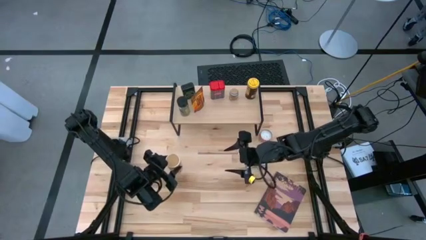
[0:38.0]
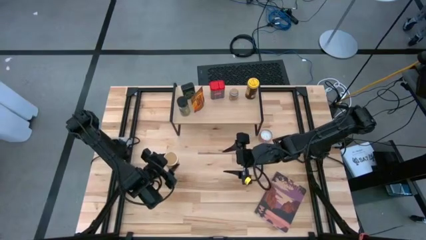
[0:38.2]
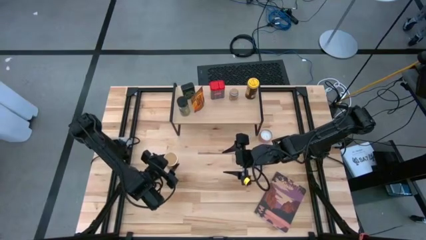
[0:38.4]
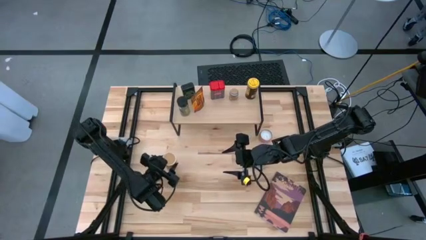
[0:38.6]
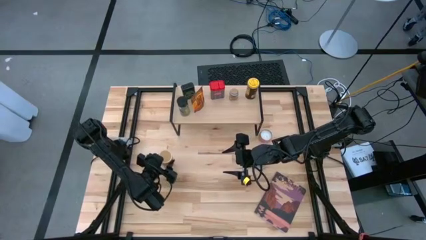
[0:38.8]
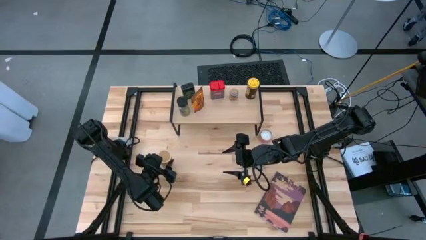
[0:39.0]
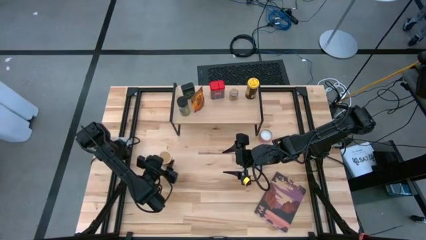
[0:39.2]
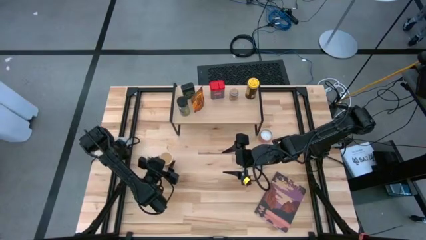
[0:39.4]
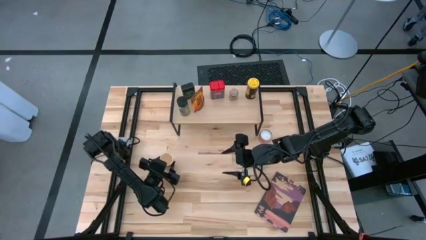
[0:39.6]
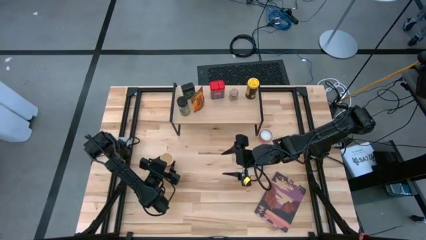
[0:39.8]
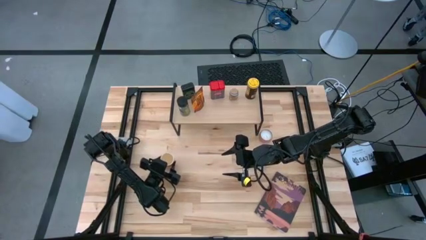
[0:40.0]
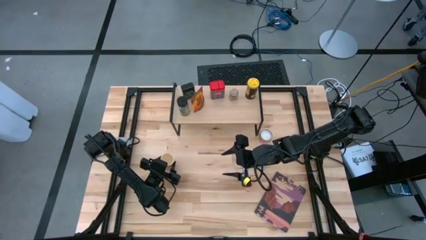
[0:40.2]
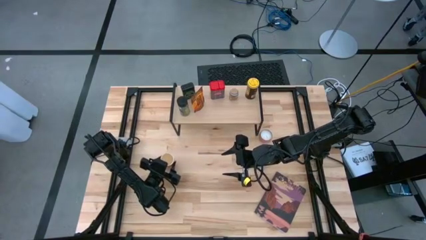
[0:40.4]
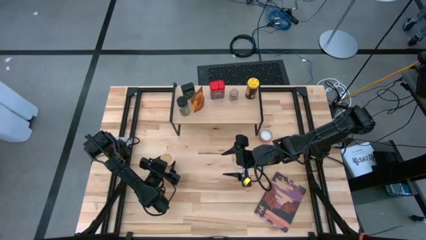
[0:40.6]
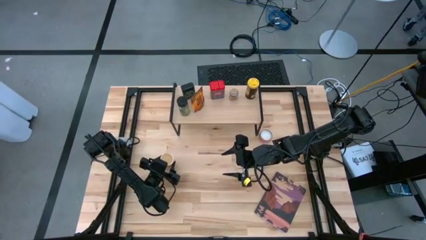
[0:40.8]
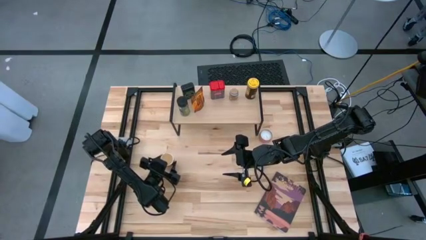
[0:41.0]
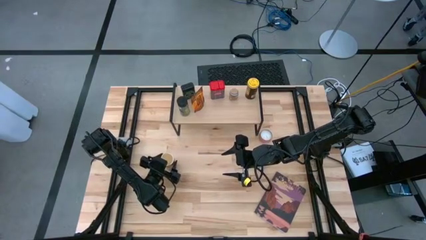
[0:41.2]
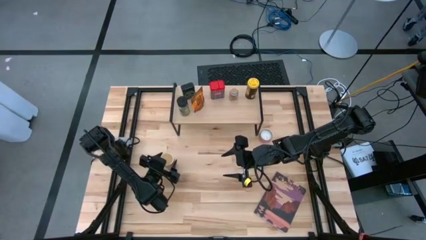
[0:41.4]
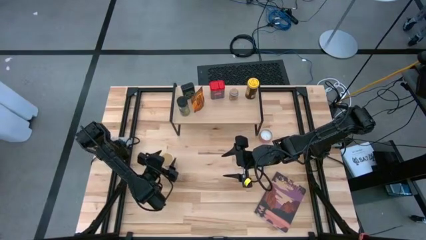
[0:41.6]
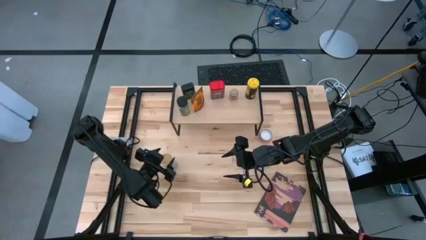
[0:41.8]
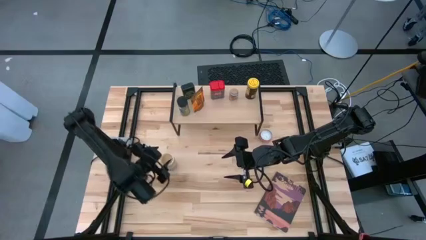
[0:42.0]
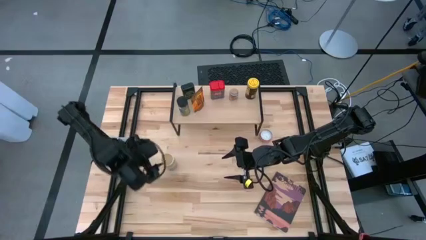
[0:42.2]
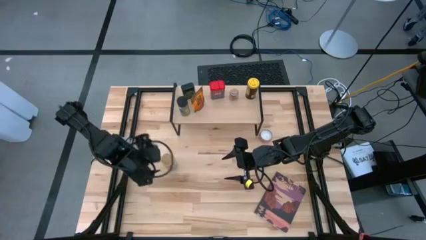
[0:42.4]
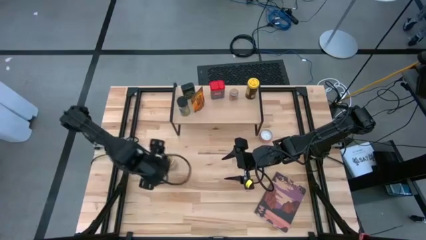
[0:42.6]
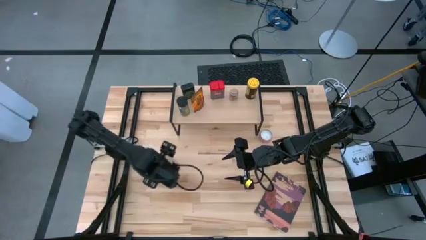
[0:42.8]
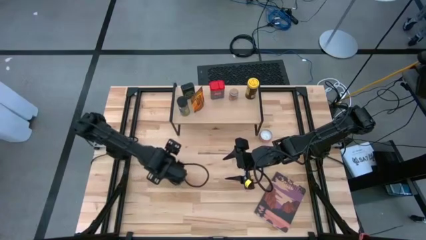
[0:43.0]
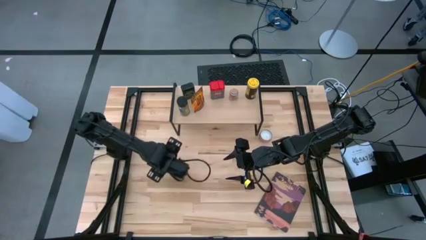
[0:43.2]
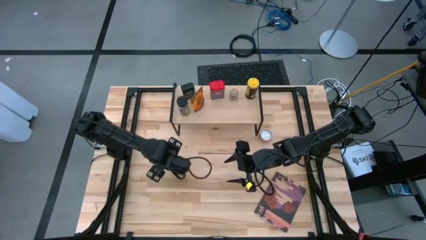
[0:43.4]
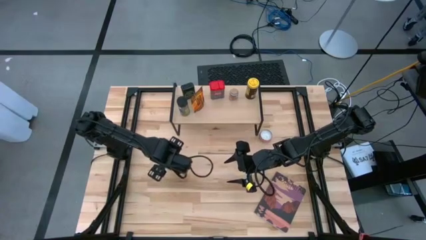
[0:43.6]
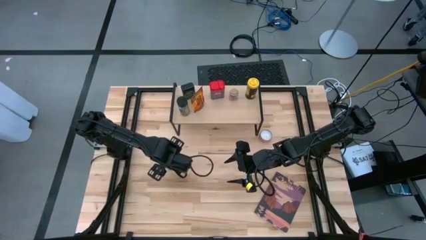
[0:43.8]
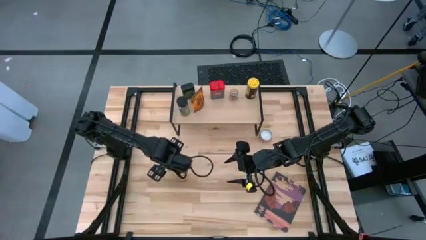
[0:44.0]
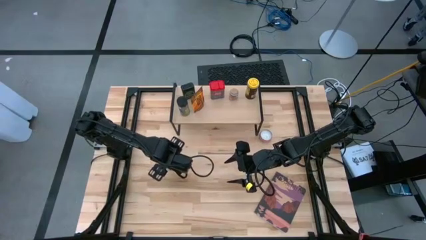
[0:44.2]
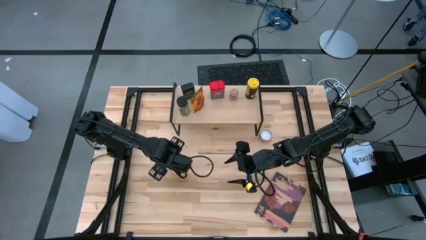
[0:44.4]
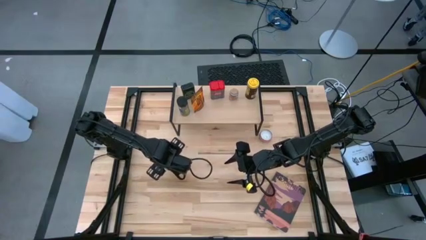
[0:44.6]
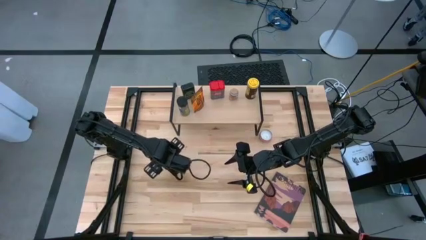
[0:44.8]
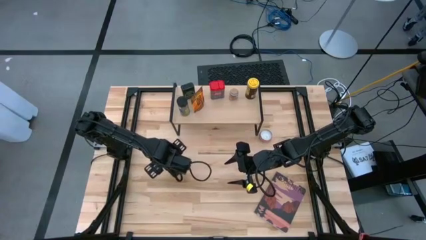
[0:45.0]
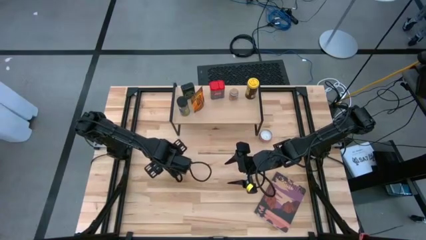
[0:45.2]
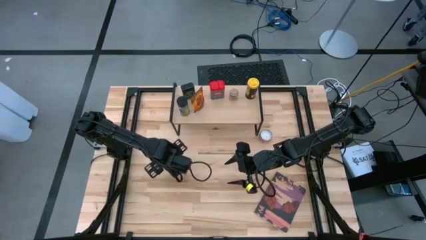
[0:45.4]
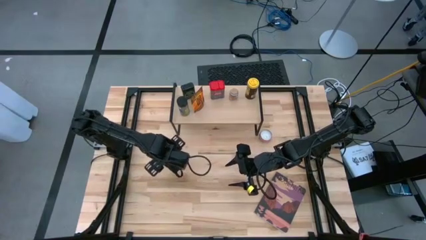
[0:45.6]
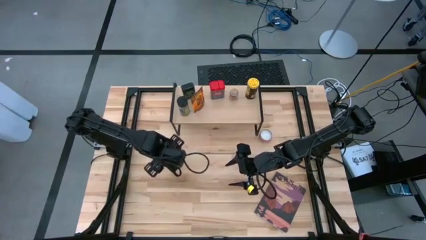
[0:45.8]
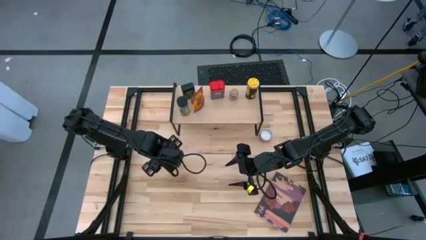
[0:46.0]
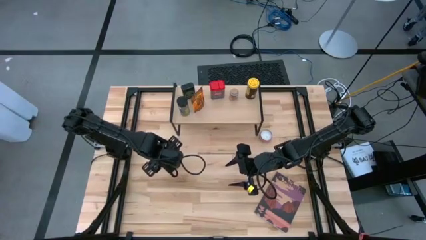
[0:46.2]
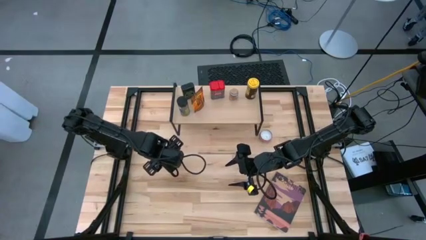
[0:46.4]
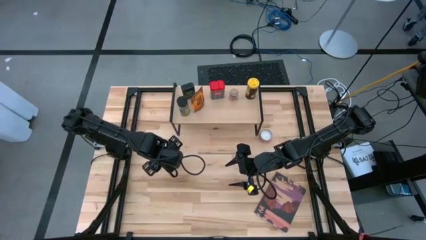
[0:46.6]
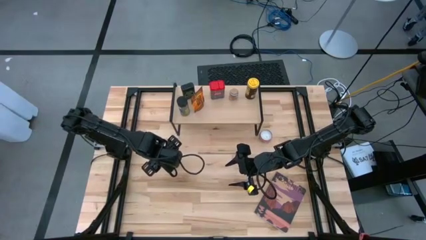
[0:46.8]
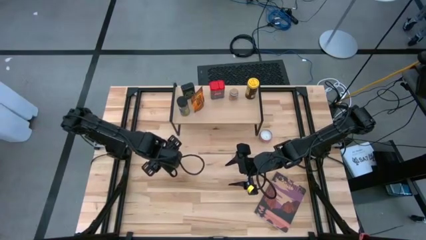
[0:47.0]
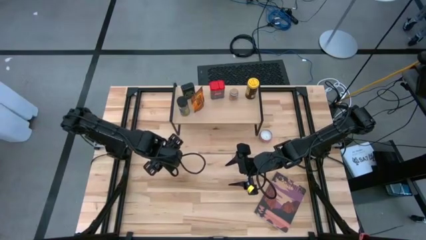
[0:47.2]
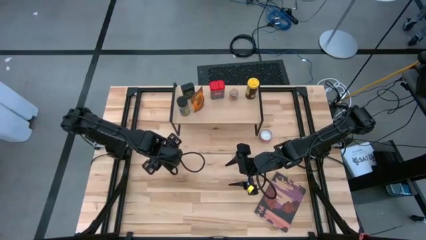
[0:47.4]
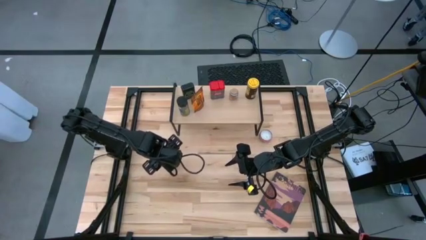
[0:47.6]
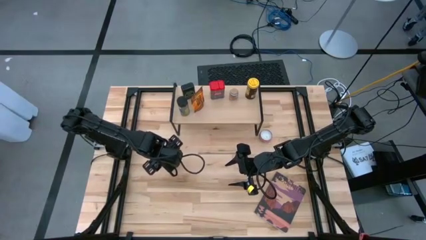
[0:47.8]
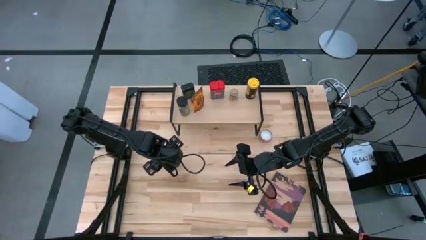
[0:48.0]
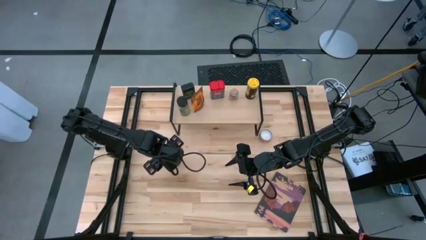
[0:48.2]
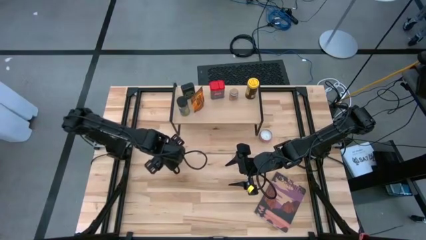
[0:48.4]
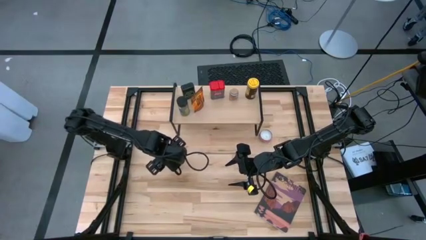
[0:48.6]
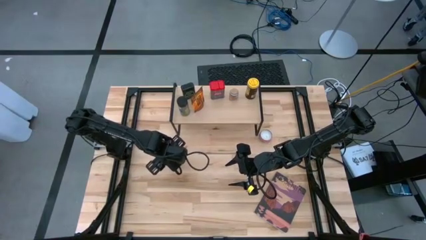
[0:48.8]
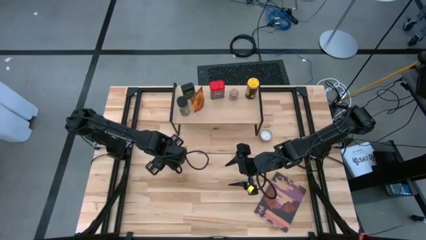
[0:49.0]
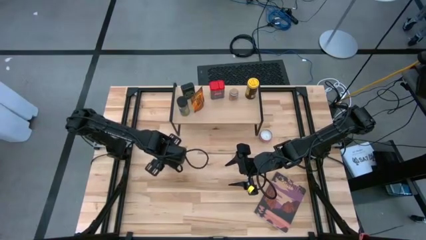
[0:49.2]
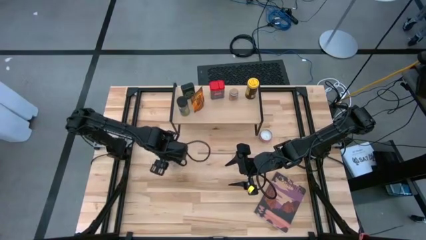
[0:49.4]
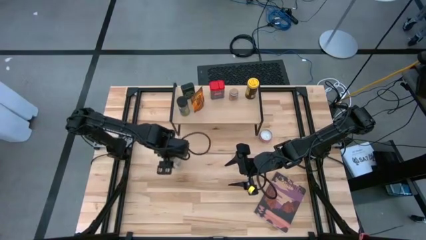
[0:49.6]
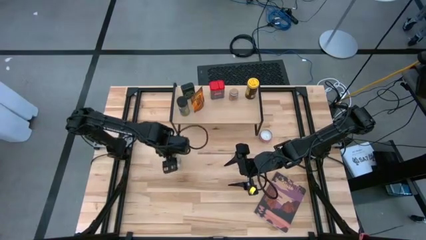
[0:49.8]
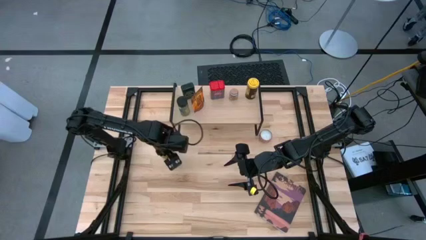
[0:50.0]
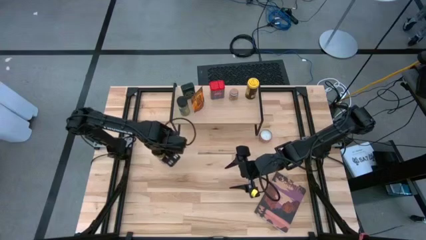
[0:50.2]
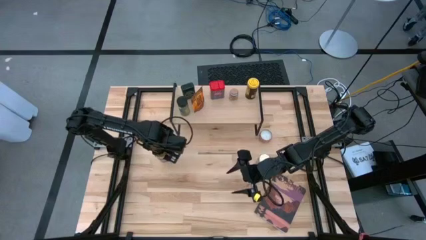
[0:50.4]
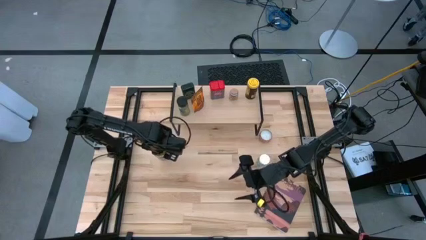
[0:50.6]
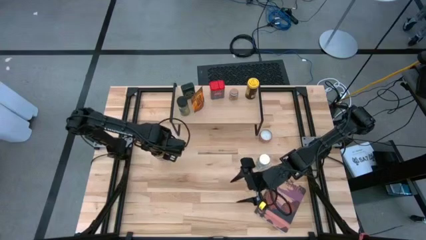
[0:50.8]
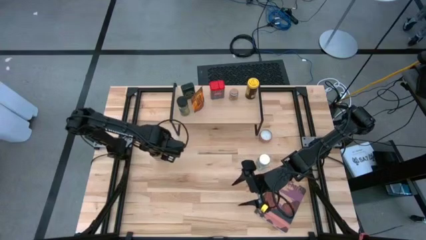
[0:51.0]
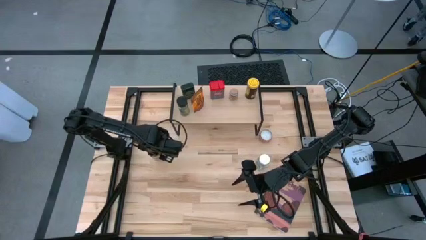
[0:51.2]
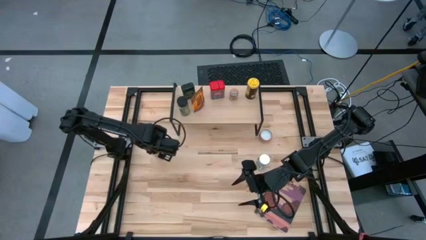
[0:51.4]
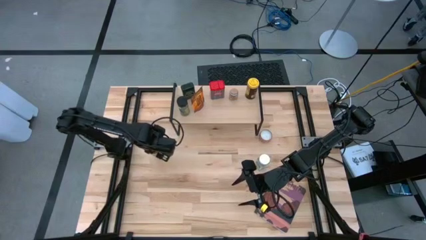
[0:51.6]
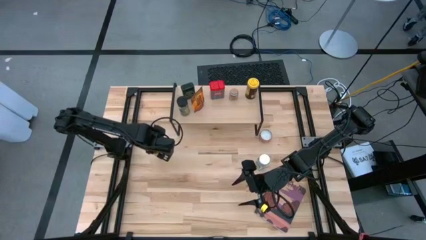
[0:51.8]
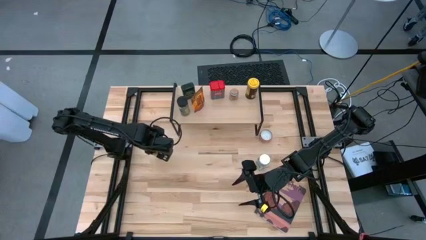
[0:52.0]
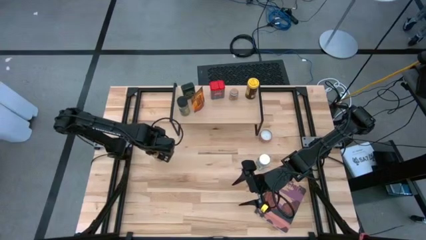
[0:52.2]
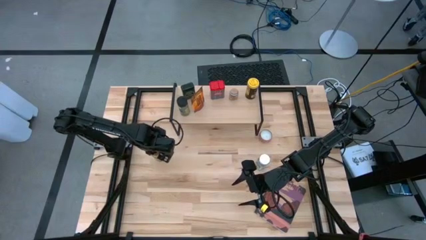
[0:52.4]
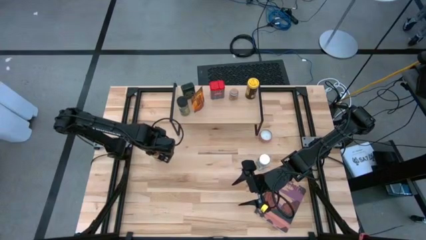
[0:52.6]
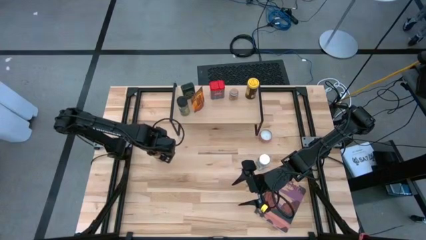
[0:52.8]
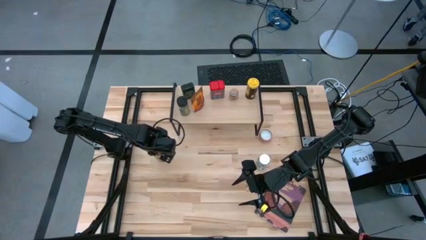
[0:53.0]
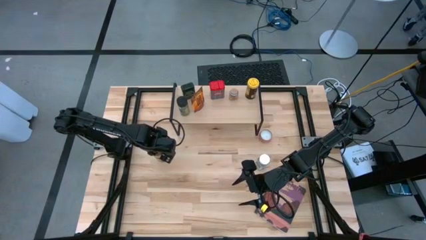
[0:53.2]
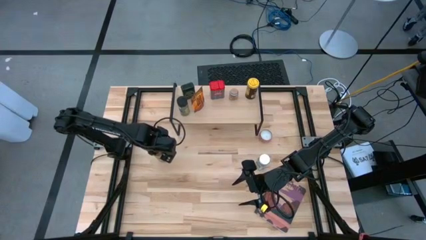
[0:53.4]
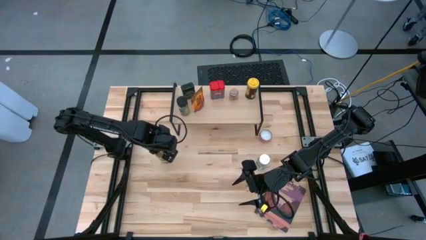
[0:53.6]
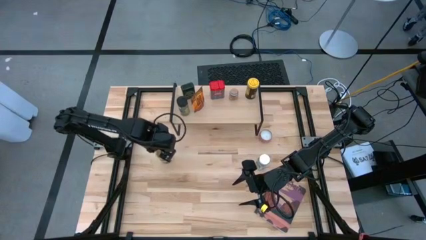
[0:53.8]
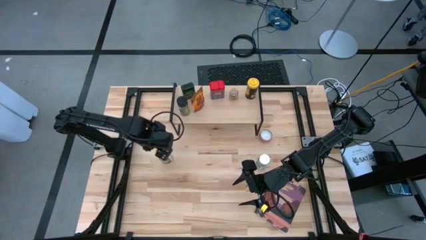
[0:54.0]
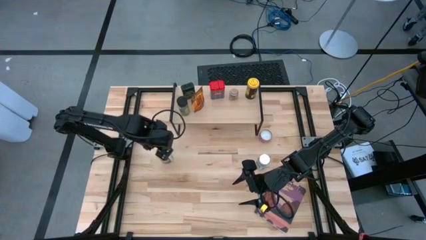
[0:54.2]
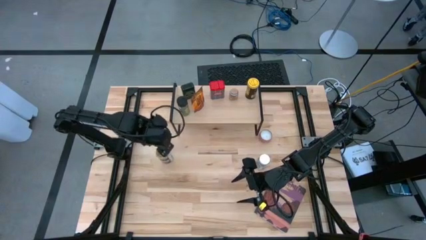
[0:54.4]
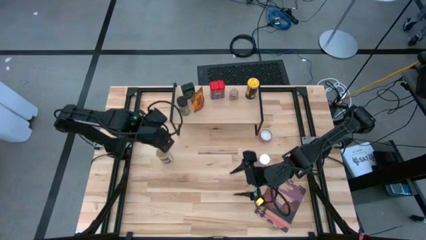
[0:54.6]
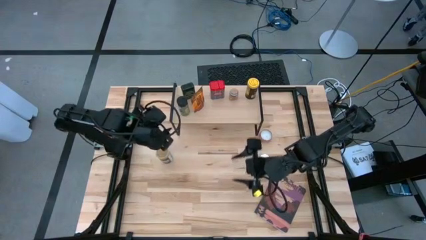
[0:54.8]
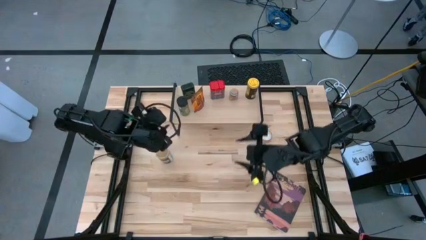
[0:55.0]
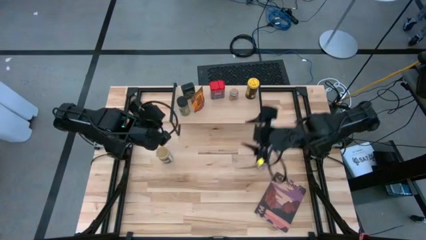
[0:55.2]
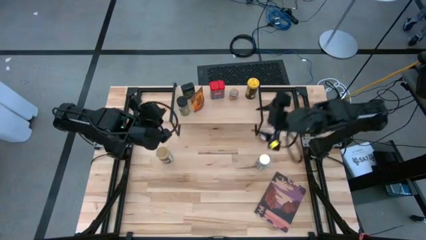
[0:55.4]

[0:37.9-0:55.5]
Task: Shelf spices
Put the brown spice bottle on the table
